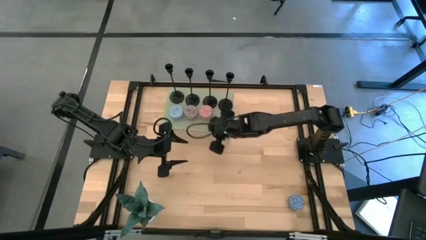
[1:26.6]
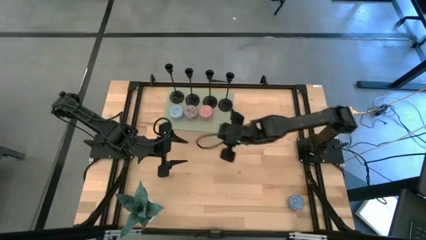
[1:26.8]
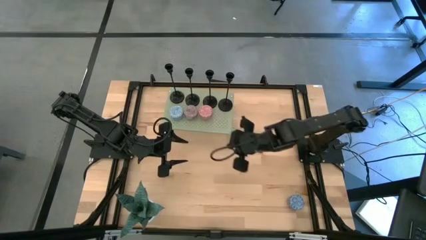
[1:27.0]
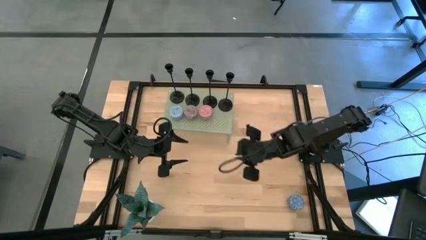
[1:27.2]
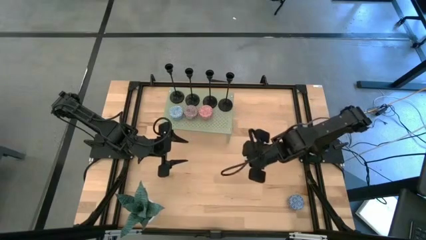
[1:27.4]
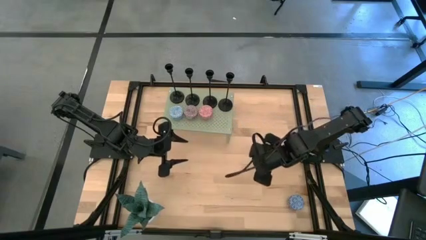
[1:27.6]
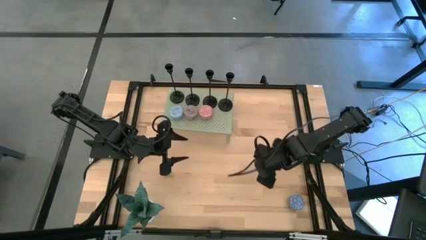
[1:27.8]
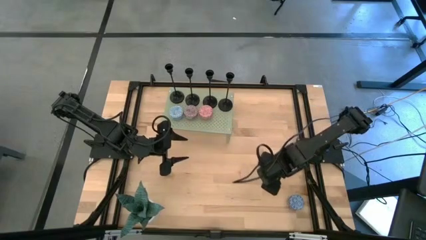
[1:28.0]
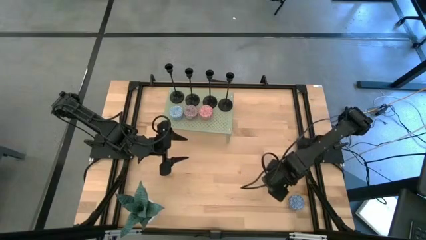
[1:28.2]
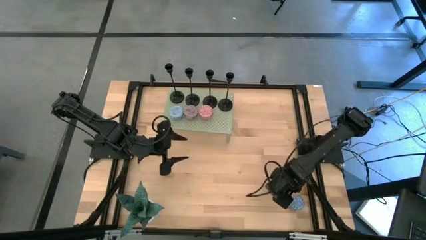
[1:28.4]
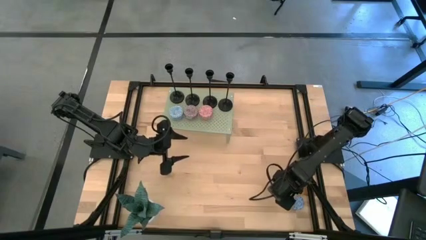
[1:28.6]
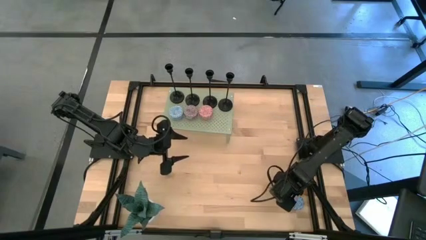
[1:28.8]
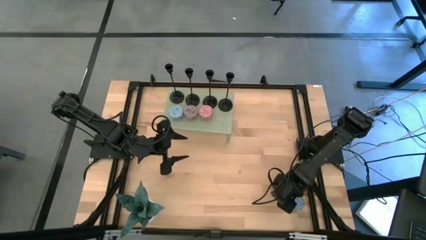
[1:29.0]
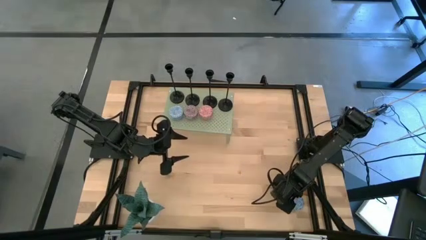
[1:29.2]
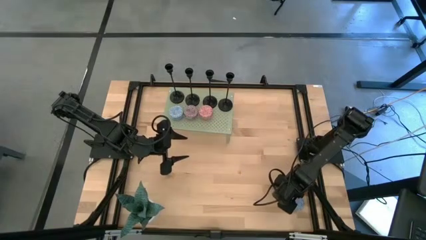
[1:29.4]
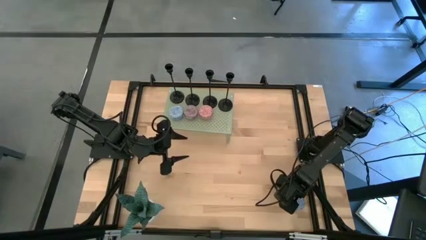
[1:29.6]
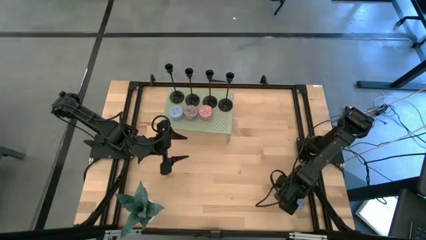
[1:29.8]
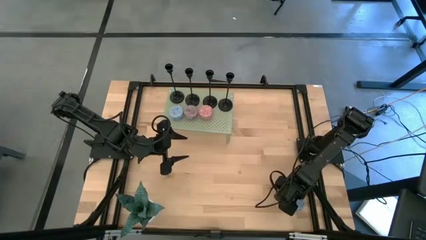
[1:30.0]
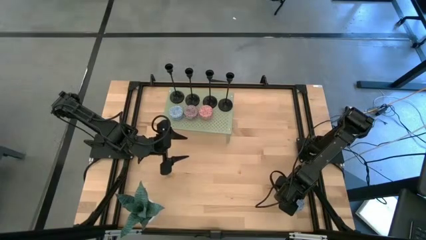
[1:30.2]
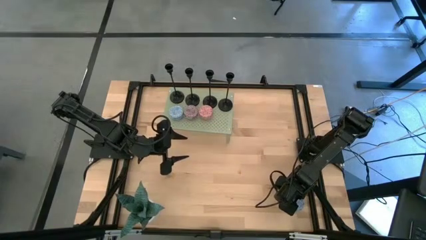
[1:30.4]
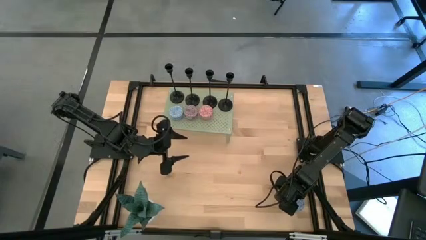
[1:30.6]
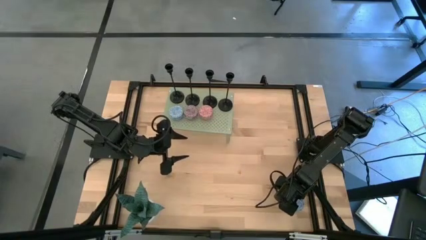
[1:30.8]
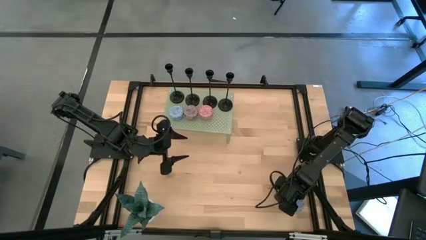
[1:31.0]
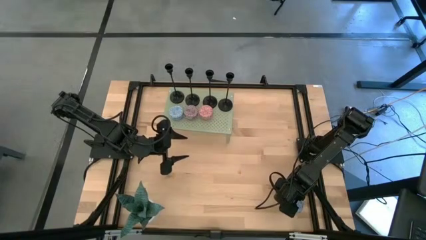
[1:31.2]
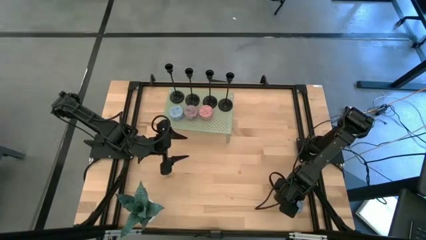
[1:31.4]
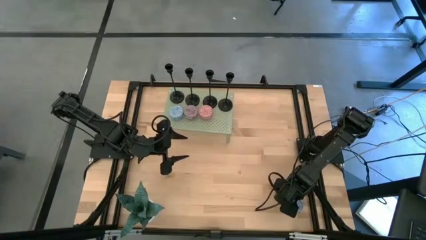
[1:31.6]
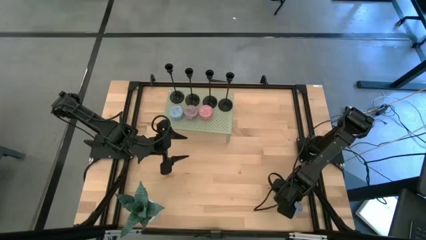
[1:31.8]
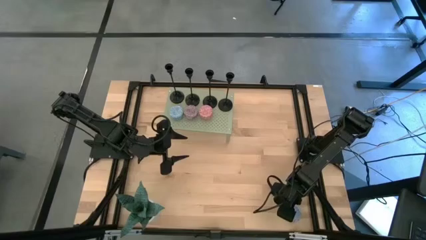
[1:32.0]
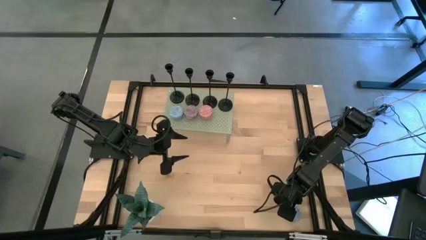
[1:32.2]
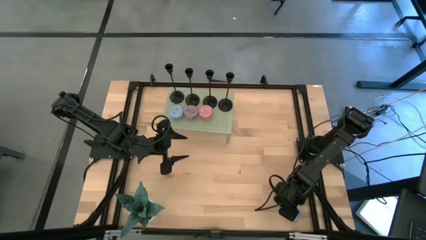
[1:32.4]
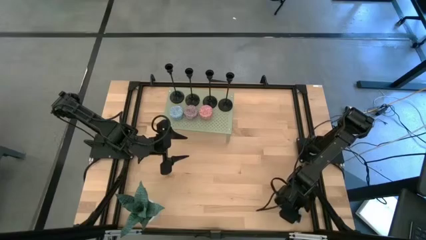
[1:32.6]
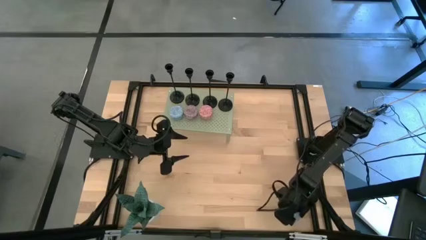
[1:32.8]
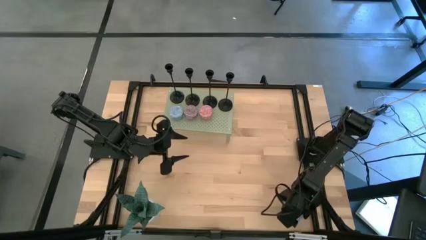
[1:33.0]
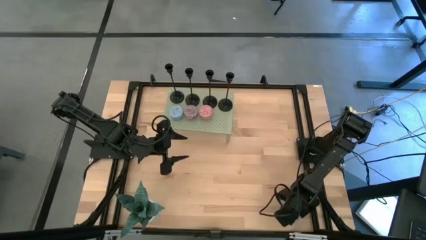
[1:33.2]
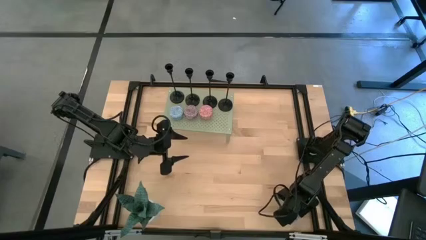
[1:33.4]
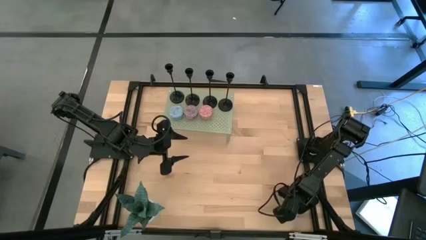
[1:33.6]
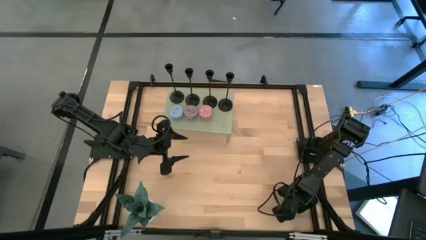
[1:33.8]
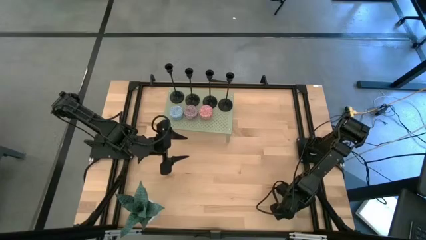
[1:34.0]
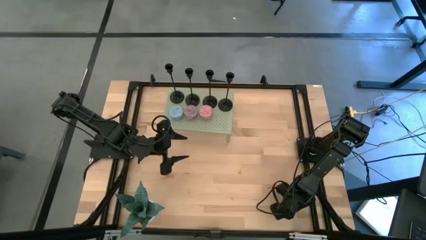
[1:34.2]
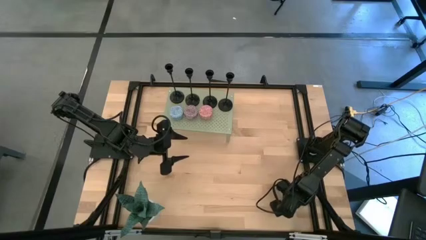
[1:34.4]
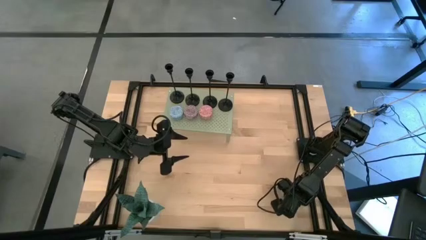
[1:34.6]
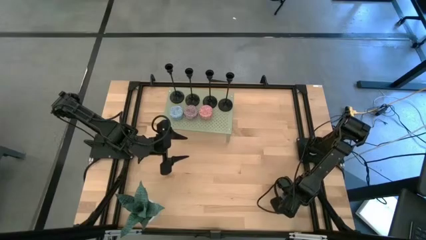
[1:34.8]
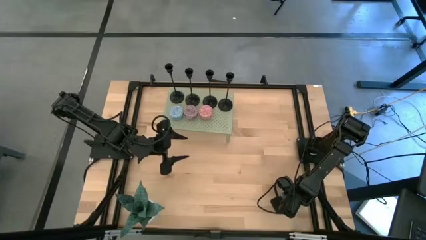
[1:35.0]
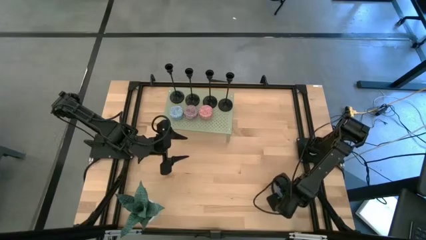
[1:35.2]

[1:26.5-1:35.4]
Task: Pick & Place candle stick holders
Put the blue candle on the shelf aligned with the other candles

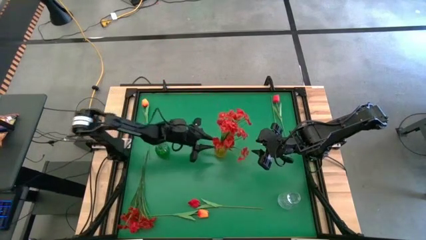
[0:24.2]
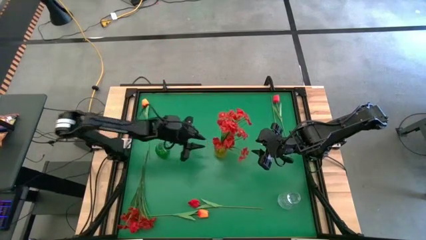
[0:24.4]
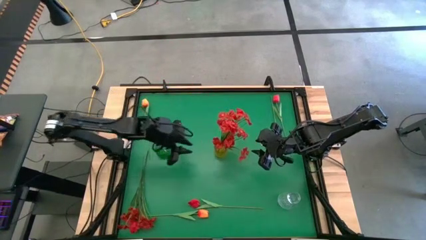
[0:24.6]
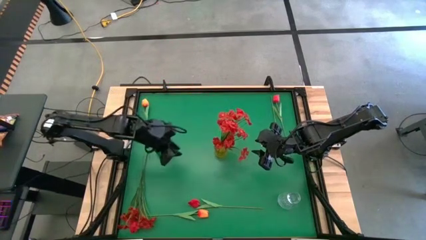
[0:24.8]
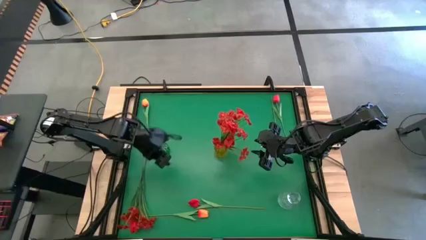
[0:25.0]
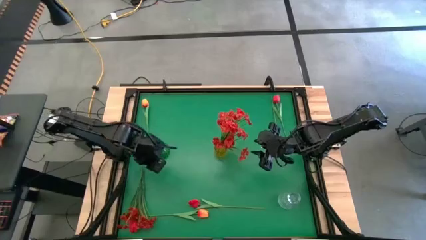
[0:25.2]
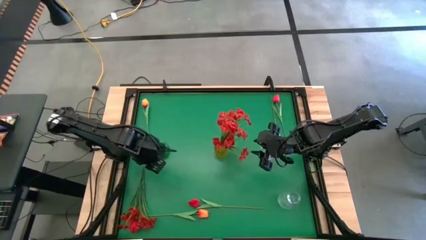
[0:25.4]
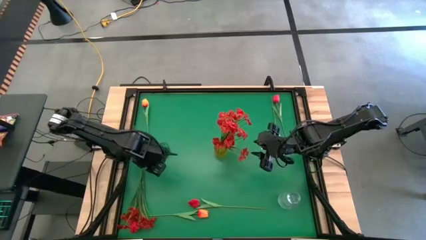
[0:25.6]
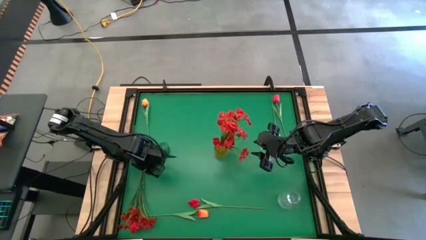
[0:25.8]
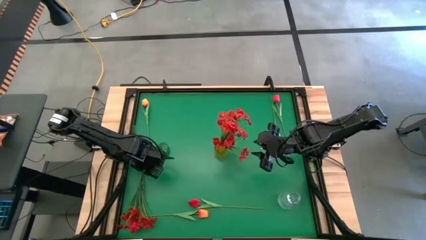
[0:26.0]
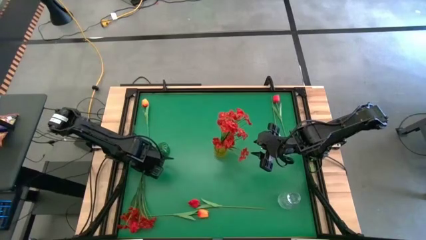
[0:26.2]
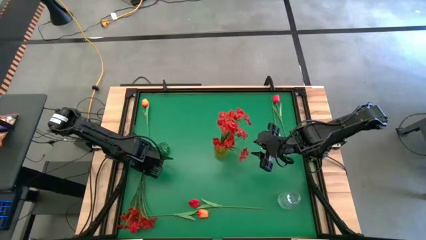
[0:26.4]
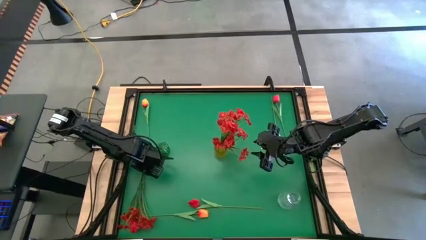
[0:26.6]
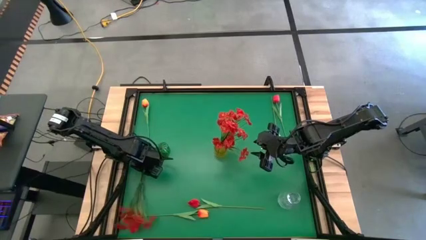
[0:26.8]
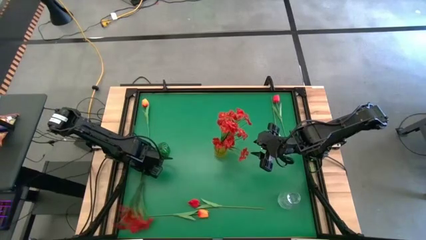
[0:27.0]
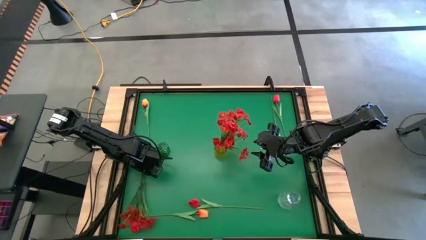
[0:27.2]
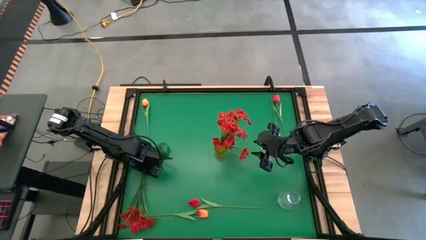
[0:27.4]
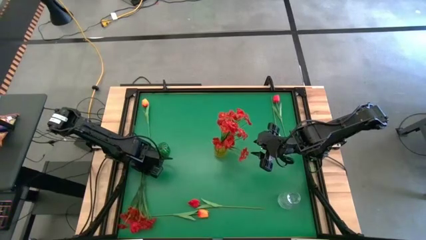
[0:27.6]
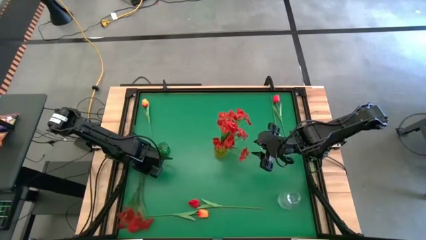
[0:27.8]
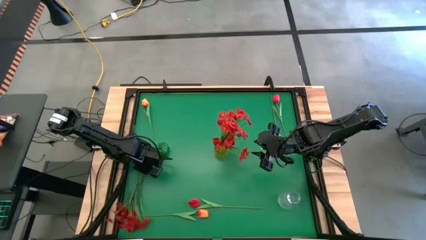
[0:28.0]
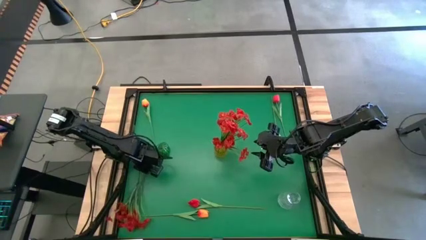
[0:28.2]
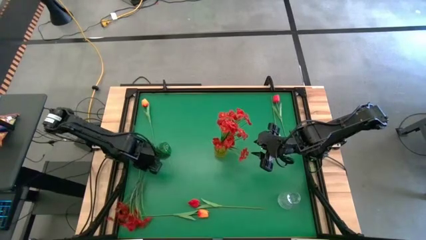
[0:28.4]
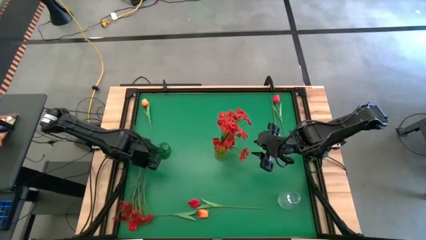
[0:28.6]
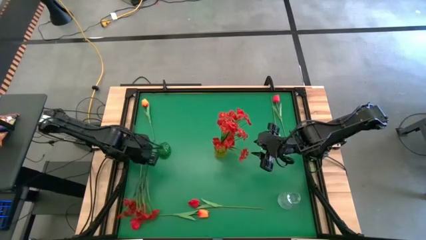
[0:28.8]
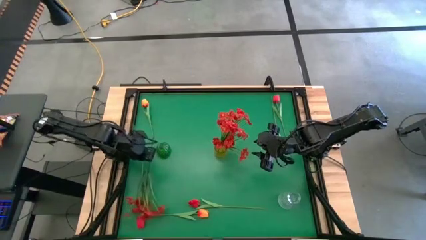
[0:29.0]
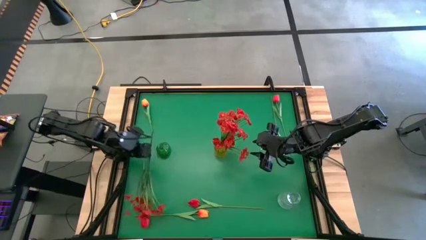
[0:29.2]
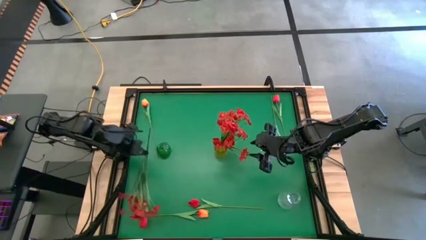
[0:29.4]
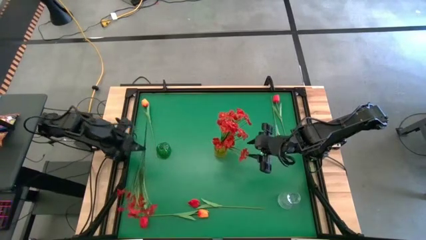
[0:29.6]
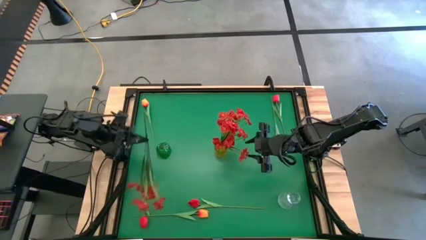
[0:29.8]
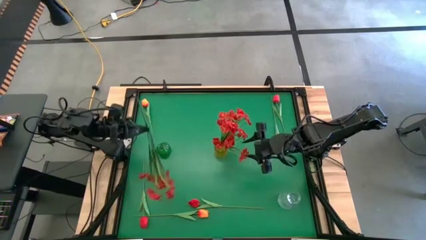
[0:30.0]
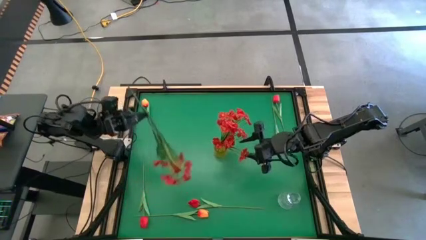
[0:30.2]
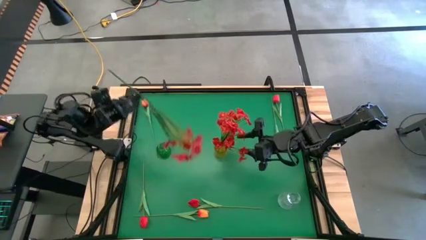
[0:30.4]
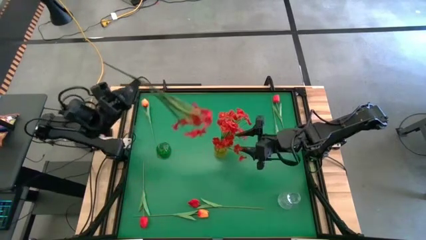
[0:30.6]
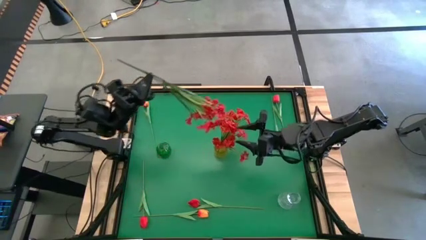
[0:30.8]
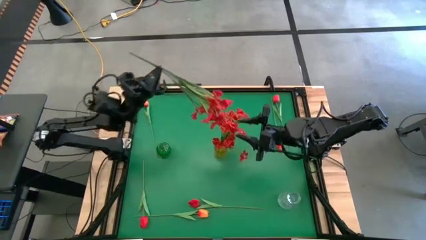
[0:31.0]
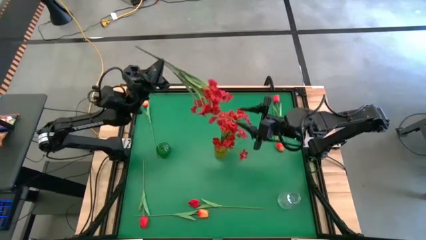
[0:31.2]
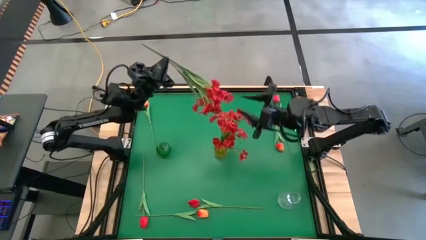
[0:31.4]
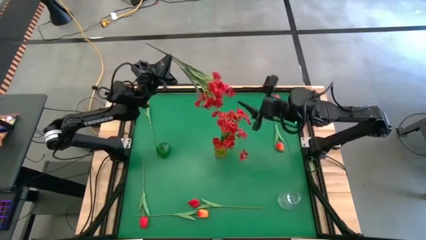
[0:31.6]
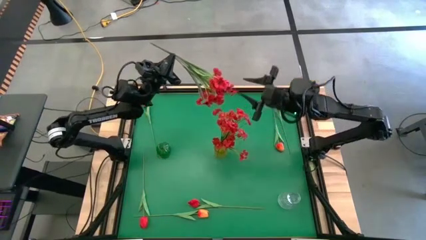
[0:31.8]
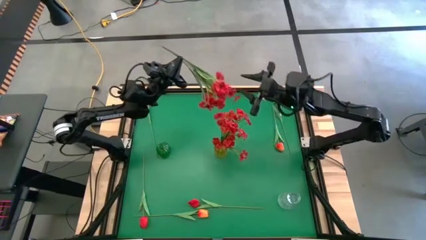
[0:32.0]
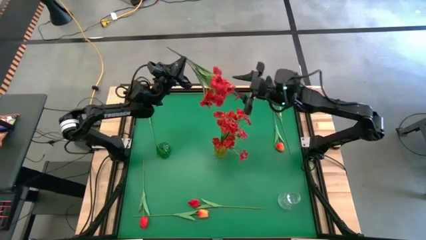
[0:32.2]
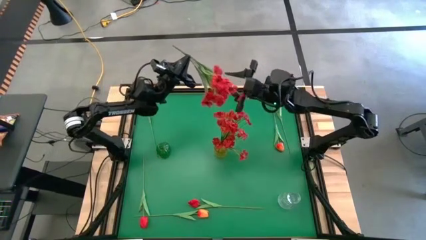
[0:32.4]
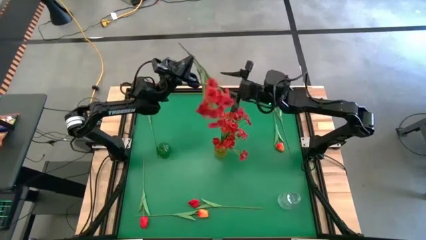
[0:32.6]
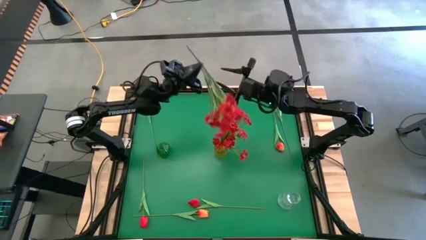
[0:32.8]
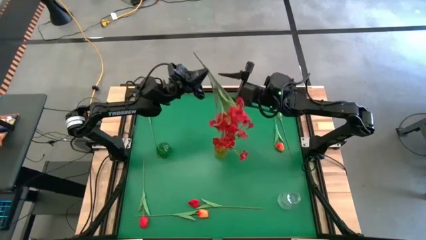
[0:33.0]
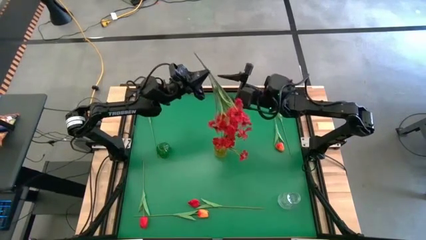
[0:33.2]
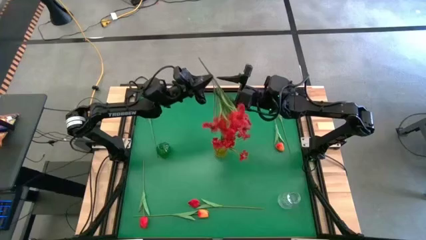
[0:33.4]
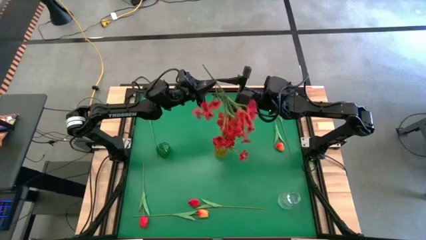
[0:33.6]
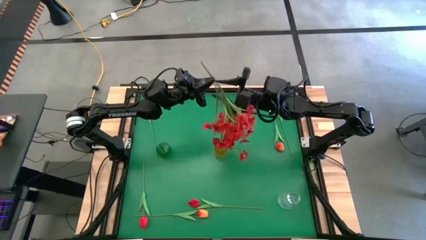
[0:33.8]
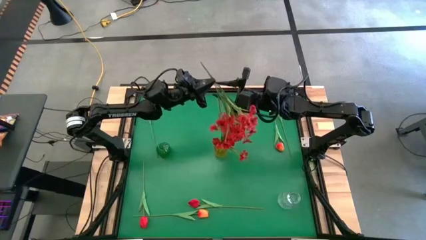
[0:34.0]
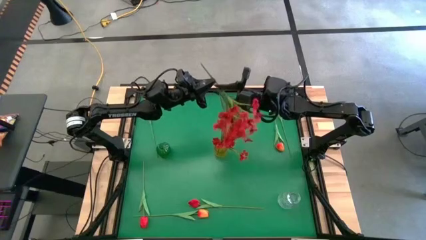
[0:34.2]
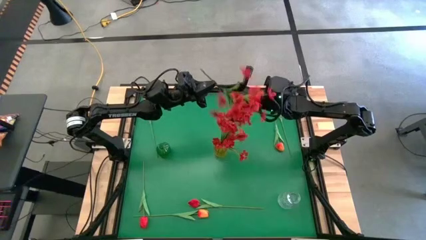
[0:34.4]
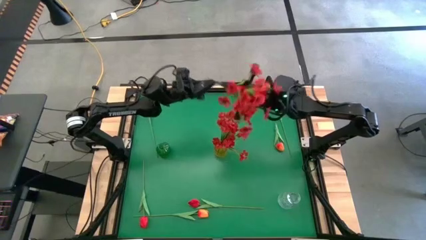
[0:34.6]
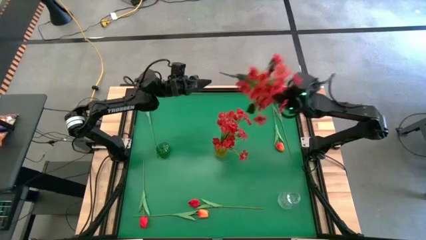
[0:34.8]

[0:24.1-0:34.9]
Task: Sort flowers into vase by color
Put the red flower into the yellow vase
